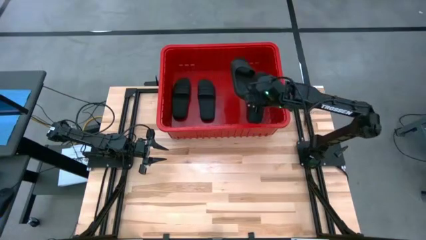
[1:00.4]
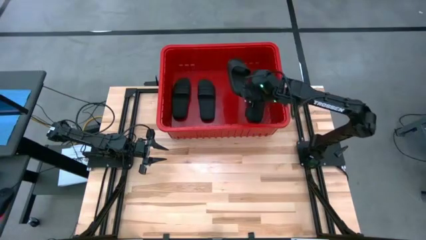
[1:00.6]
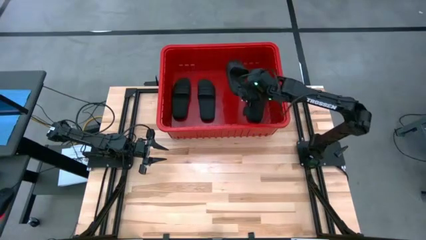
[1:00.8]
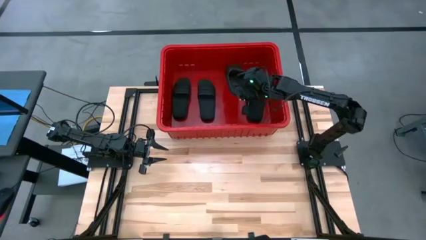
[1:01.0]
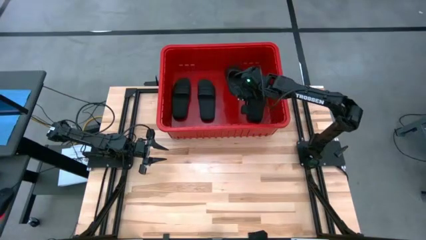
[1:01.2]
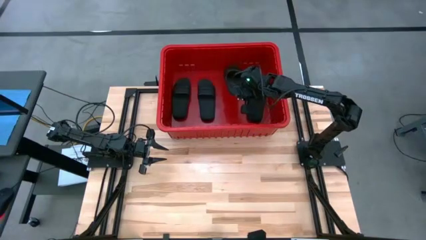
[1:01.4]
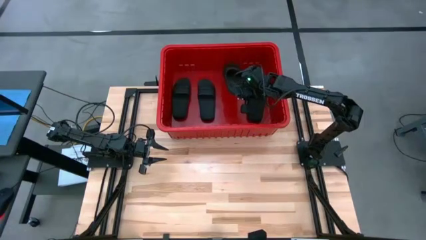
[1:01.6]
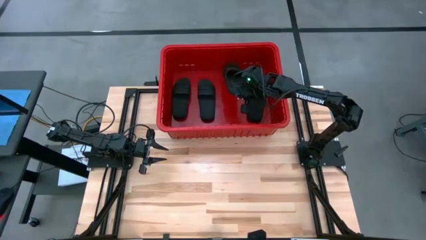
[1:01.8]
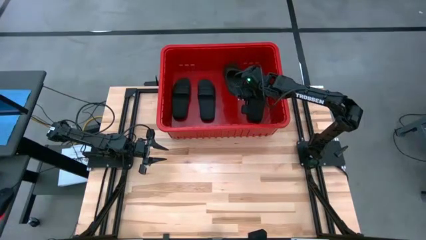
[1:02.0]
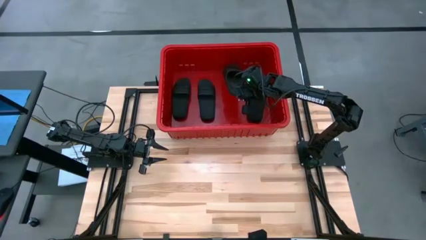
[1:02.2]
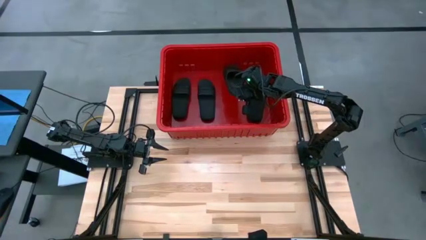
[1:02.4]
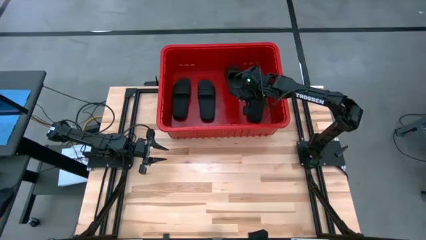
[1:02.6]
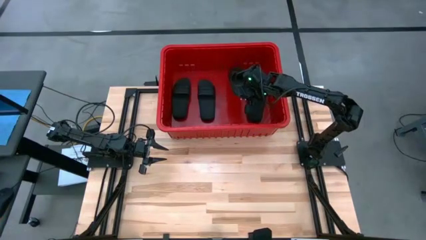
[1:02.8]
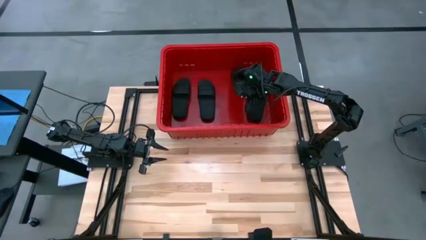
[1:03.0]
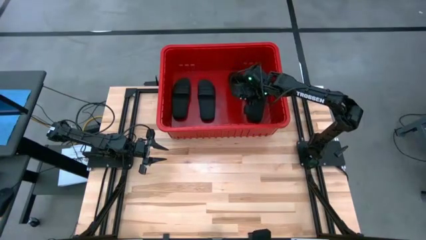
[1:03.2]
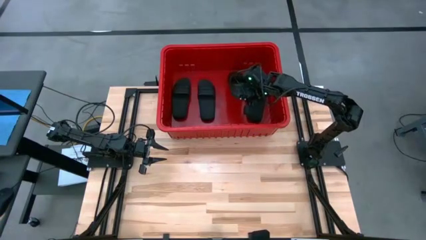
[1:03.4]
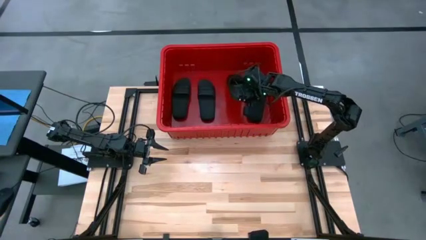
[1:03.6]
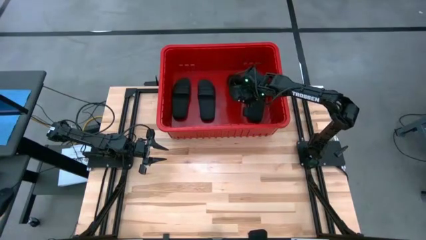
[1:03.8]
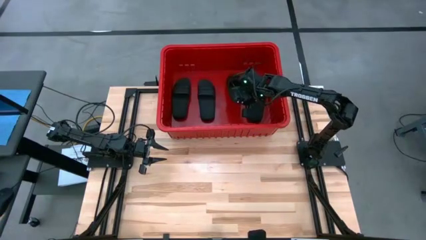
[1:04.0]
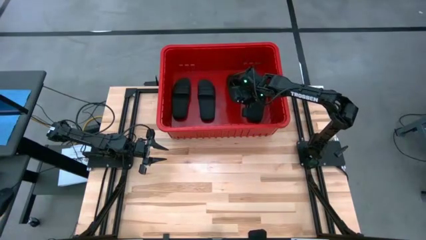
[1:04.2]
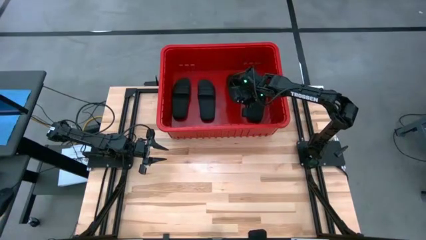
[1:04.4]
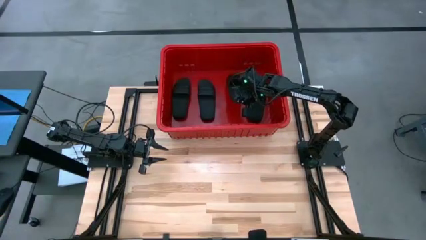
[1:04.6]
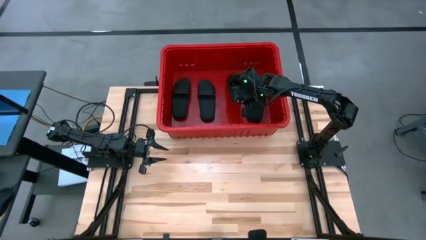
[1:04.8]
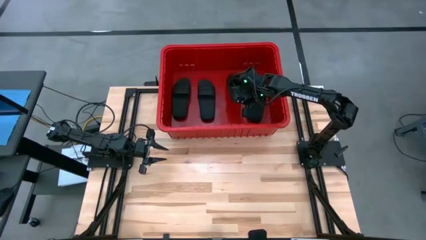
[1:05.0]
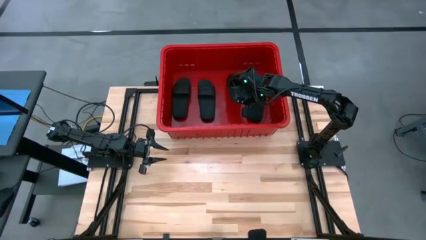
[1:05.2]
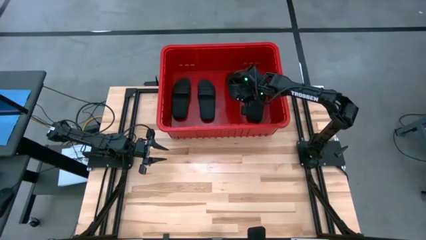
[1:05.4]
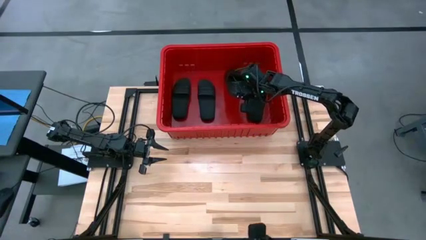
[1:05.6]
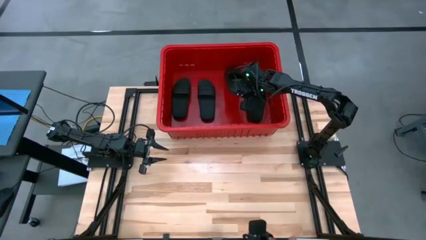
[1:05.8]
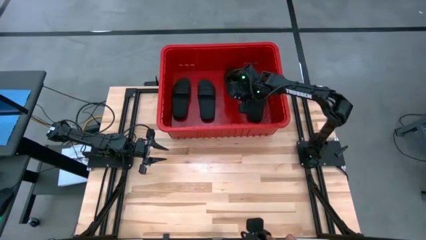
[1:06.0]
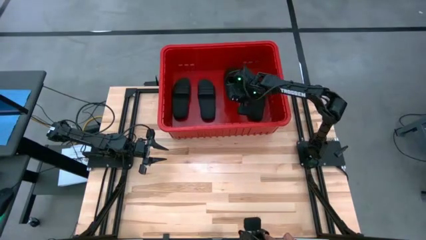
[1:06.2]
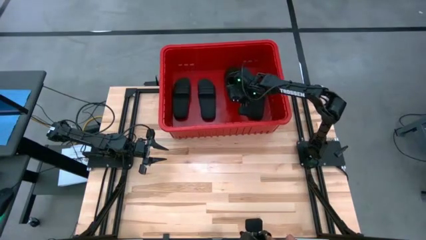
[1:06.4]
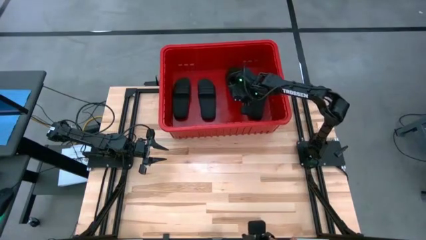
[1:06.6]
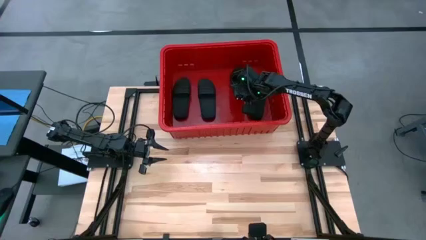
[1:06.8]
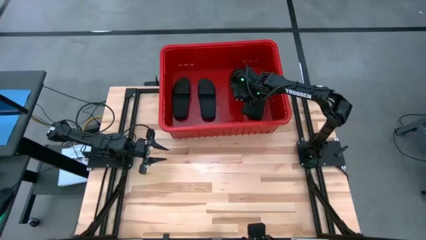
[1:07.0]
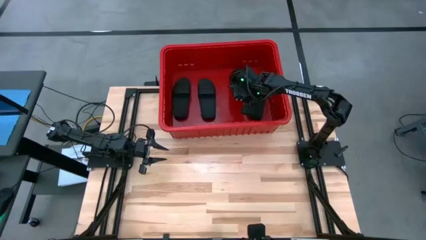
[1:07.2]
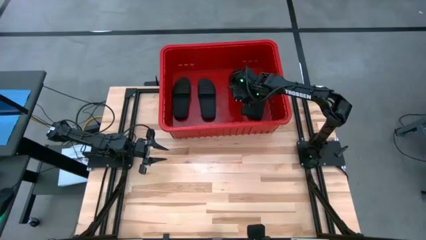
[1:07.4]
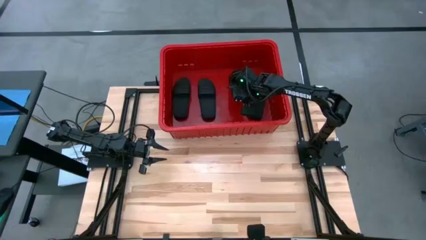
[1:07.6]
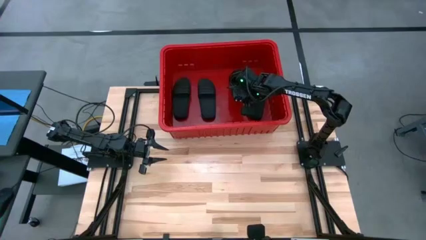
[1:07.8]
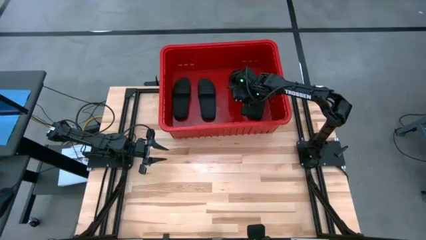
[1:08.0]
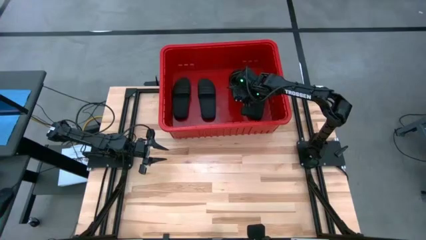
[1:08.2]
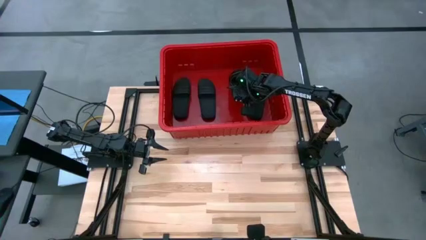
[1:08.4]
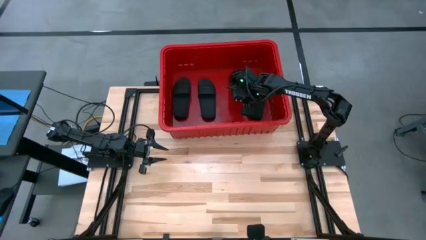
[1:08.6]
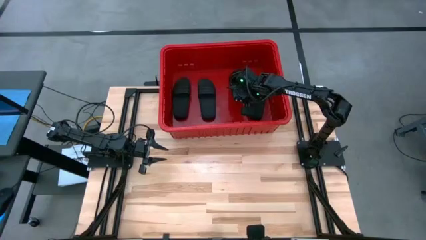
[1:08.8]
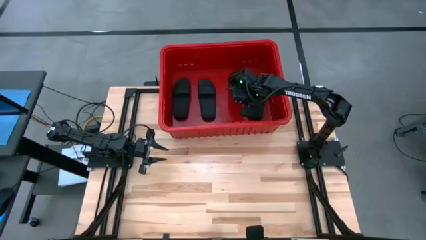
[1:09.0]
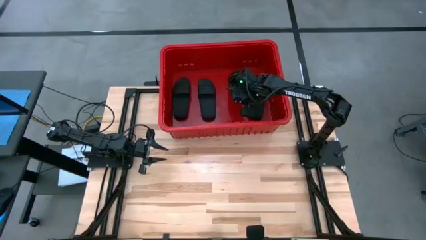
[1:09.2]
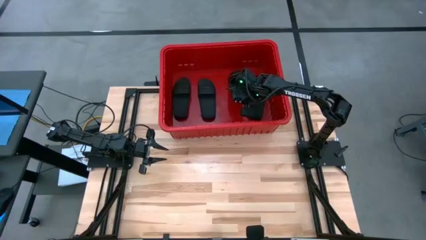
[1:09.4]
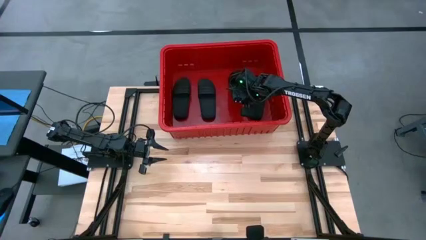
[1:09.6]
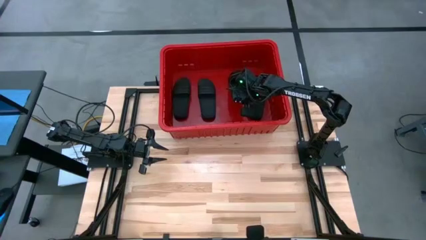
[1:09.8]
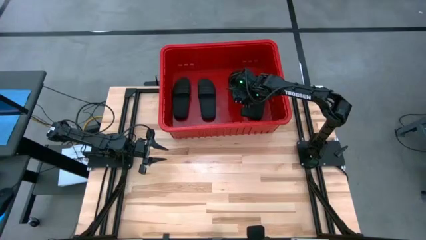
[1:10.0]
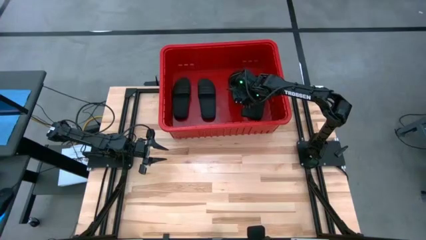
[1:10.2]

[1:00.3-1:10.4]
Task: Pick and place slides into bin
Put the slide into the bin
